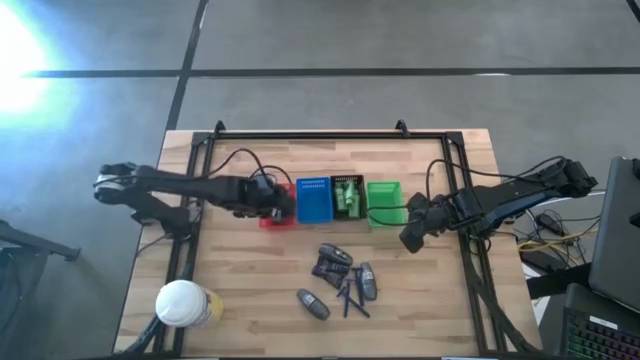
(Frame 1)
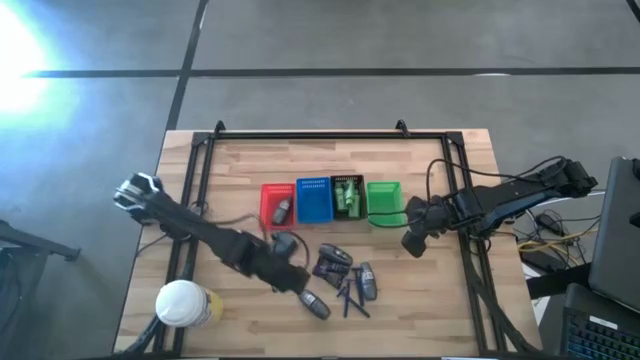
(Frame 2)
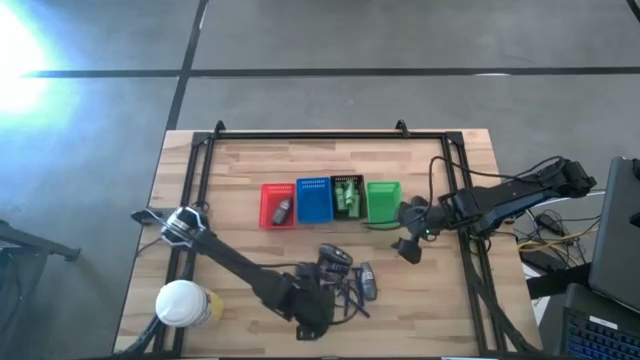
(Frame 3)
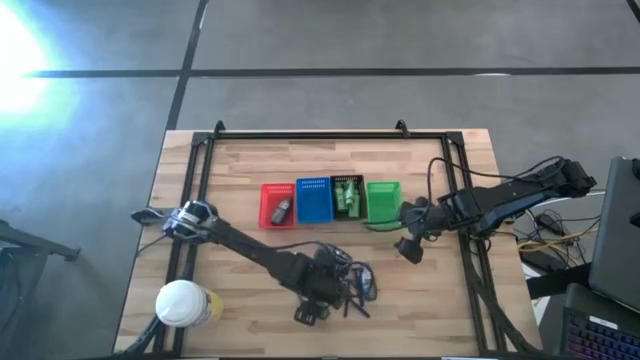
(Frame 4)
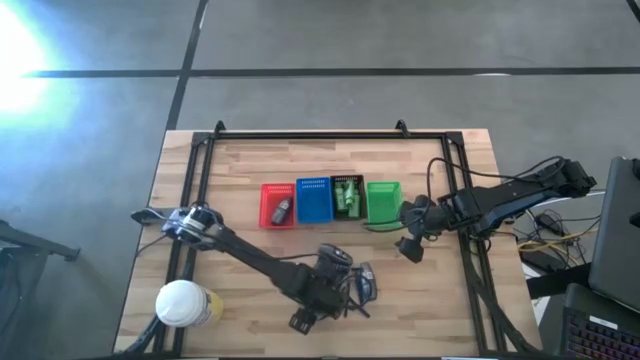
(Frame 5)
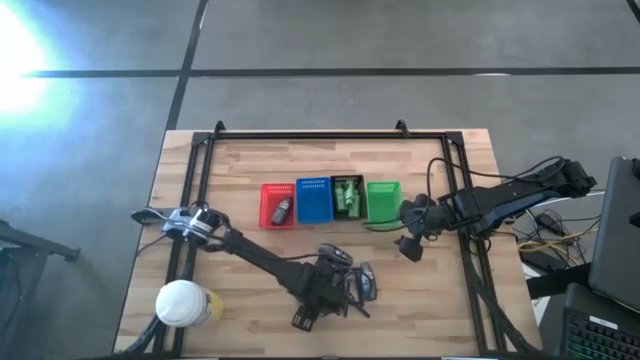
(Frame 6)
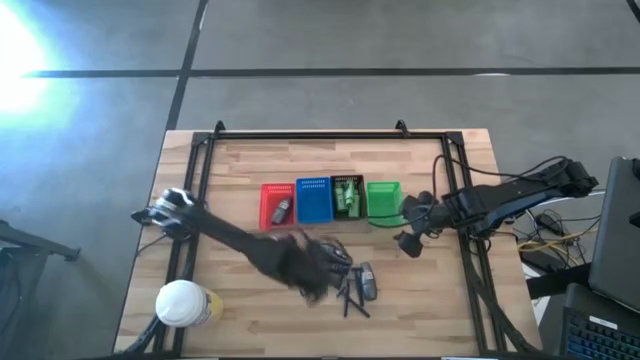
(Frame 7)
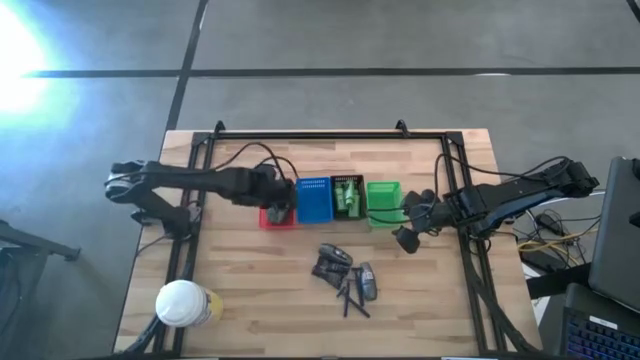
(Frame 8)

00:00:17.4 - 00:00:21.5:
Task: Pick & Place Travel size toiletries
Put the black deodorant into the red basket

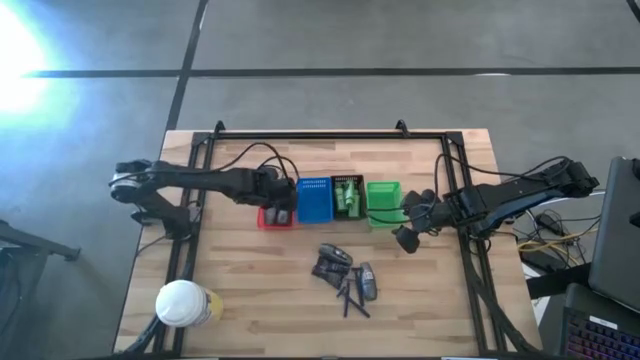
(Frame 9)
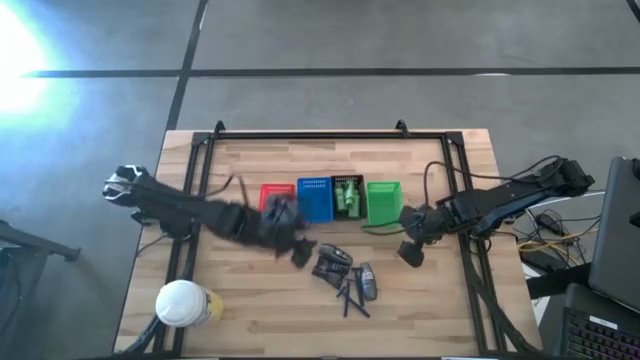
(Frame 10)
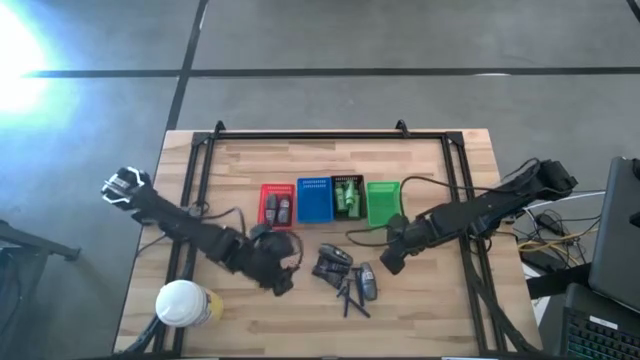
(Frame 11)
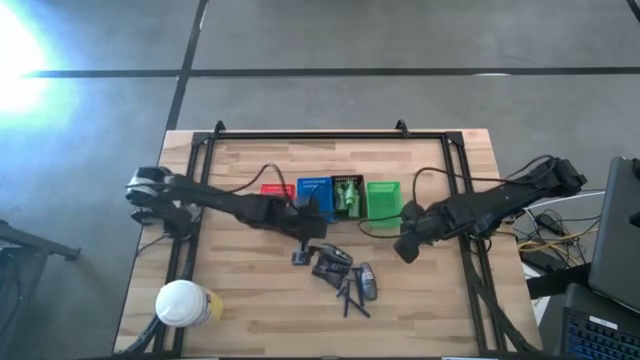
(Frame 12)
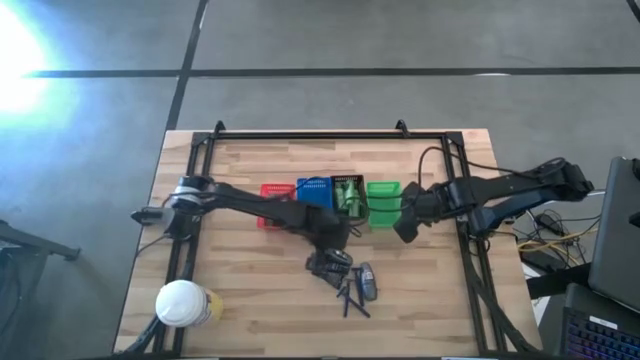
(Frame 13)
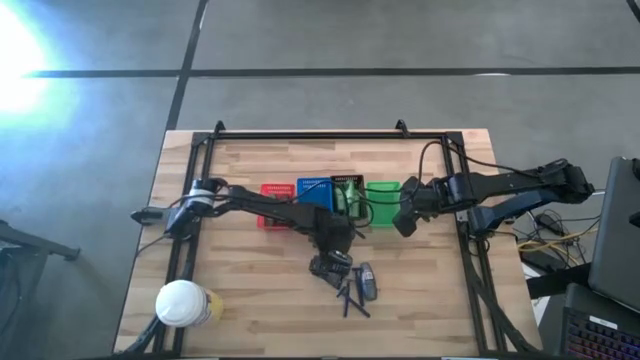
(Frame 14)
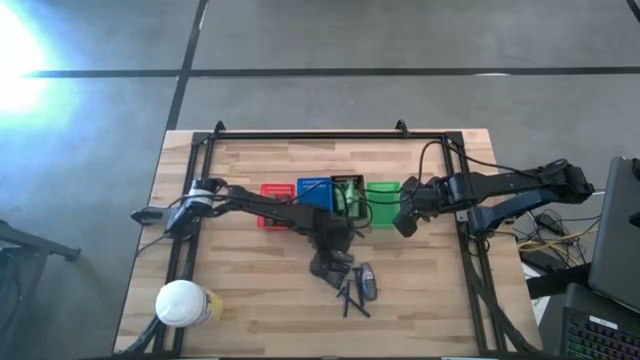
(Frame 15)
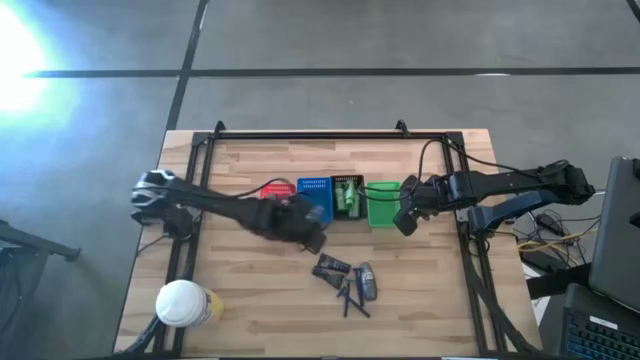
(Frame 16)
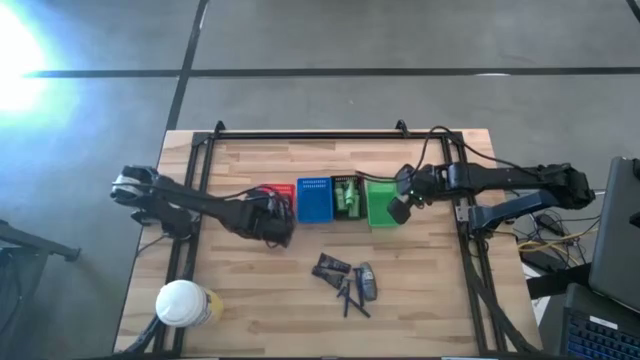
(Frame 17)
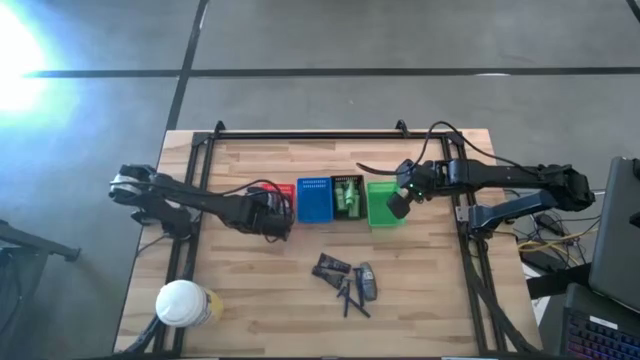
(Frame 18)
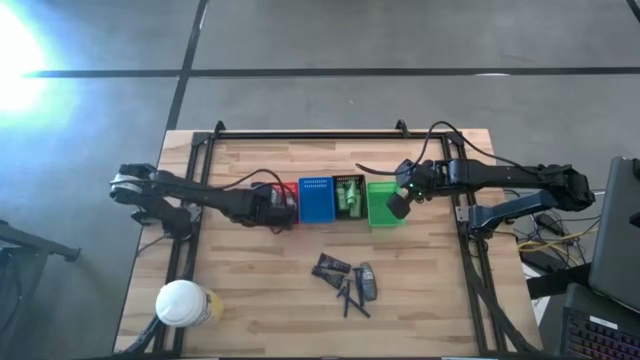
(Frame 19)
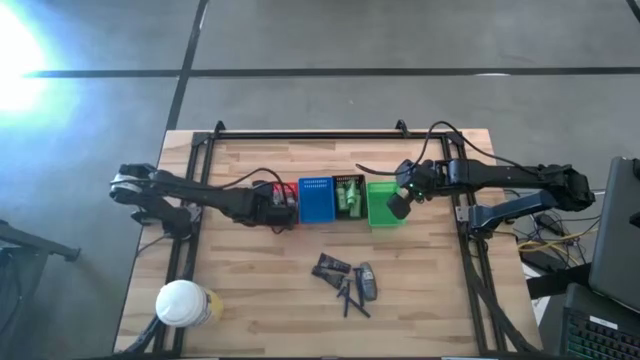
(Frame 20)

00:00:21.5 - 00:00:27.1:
Put the black deodorant into the red basket

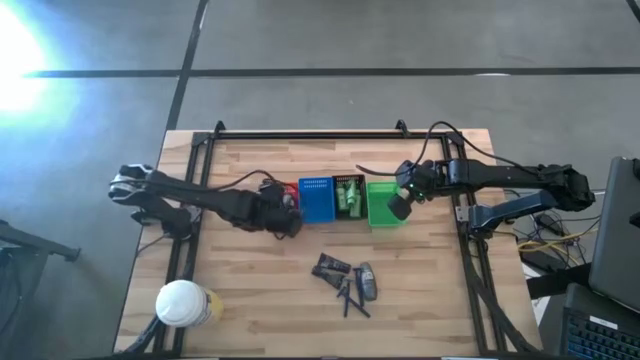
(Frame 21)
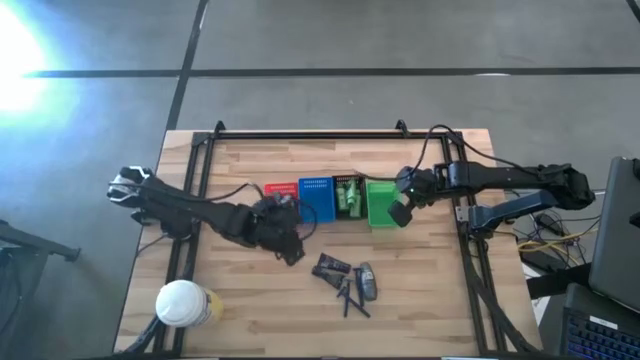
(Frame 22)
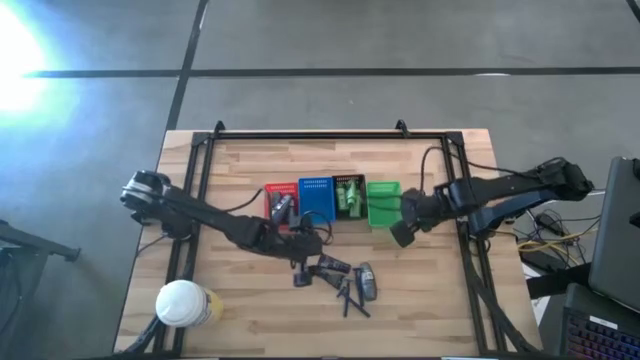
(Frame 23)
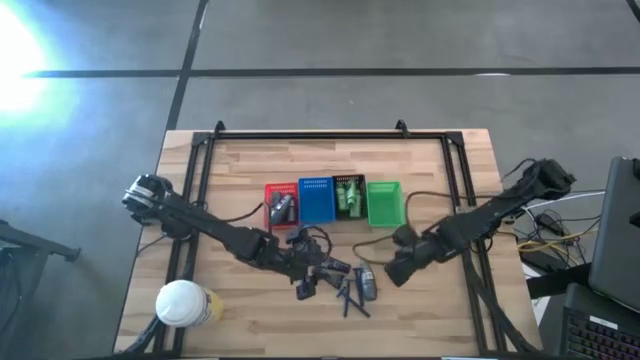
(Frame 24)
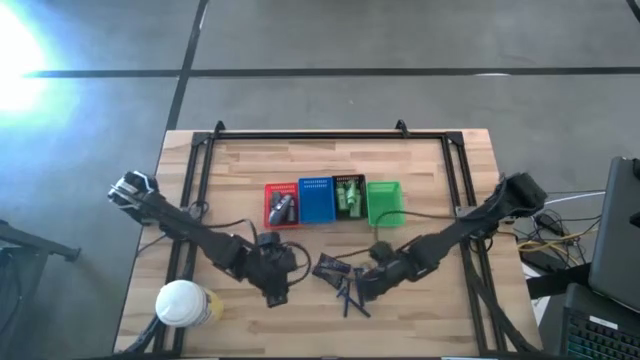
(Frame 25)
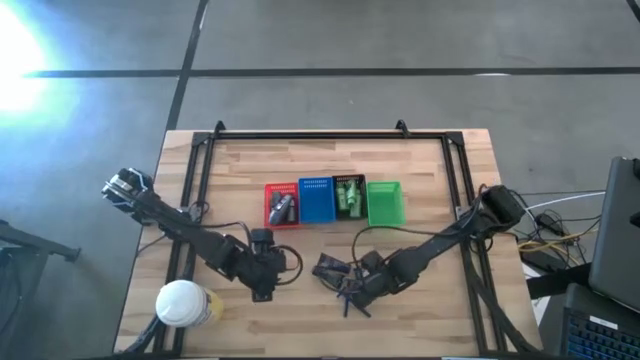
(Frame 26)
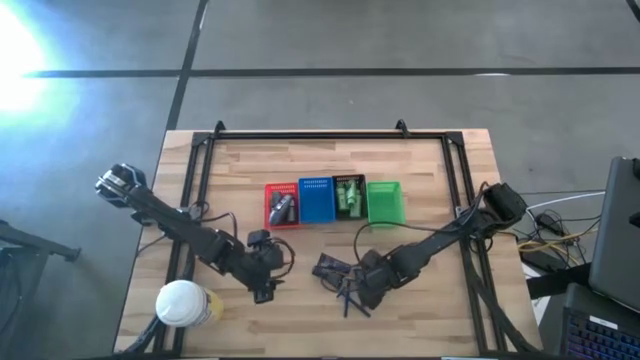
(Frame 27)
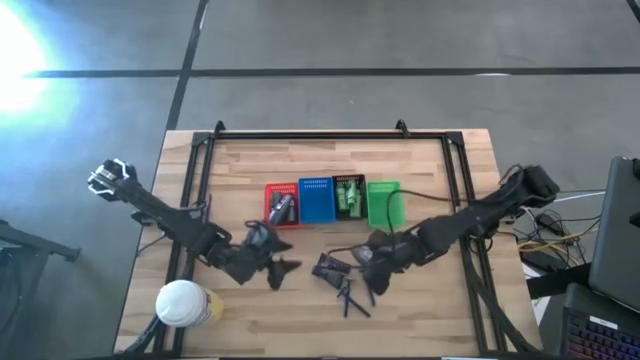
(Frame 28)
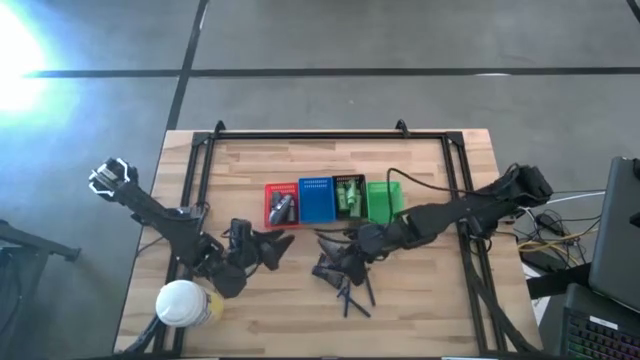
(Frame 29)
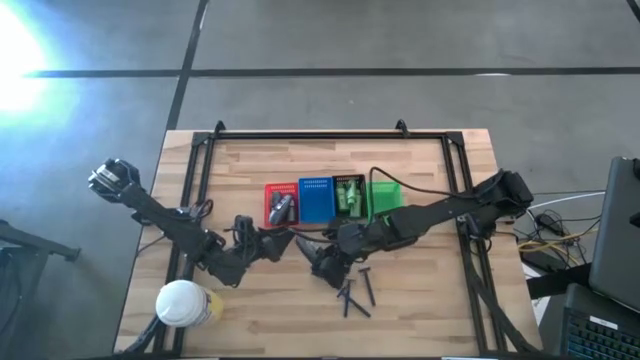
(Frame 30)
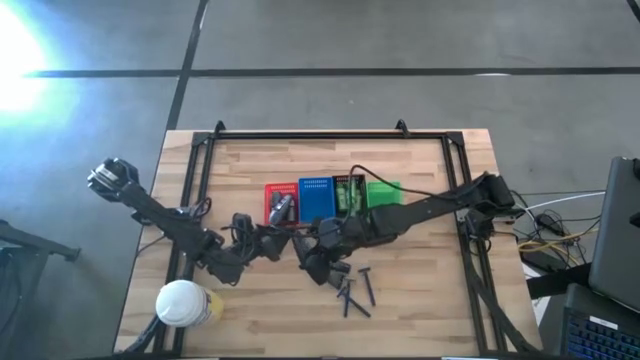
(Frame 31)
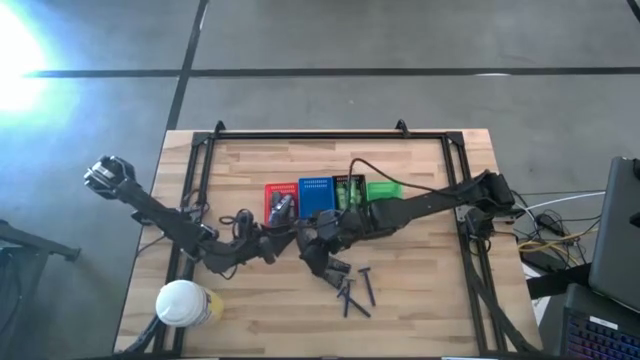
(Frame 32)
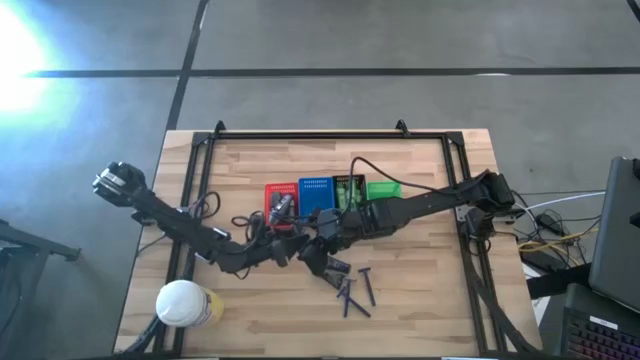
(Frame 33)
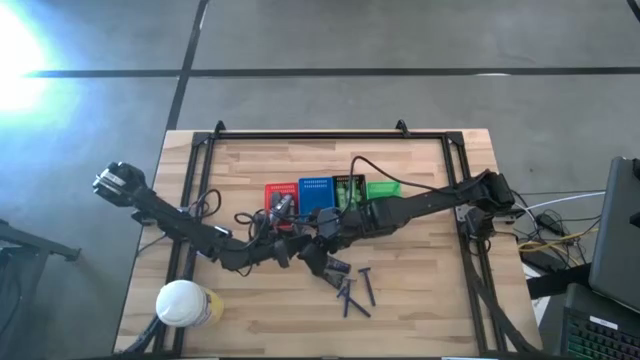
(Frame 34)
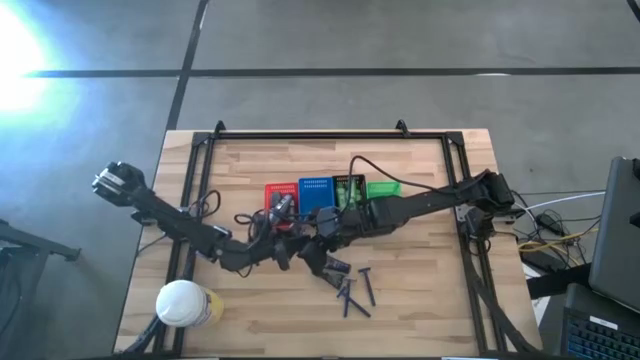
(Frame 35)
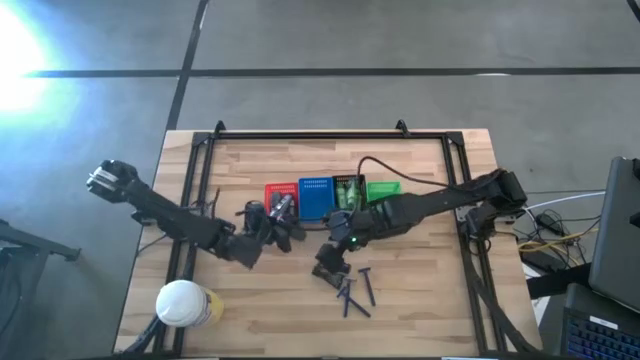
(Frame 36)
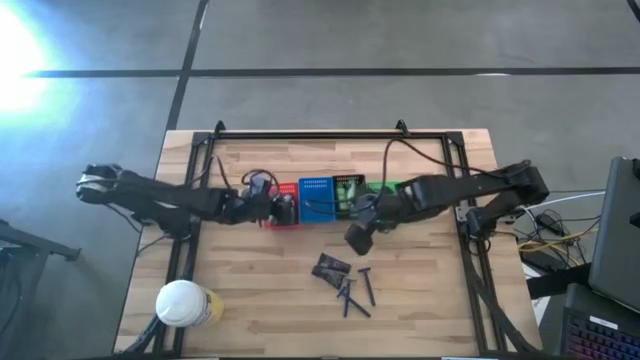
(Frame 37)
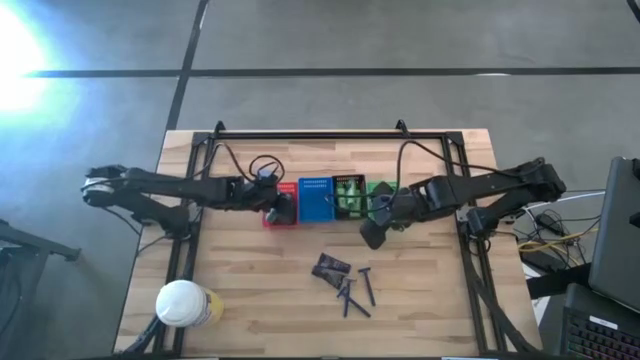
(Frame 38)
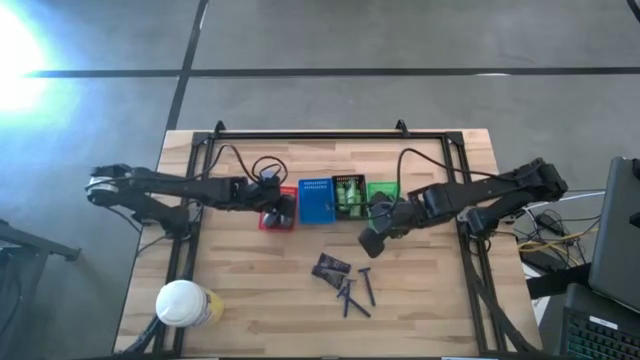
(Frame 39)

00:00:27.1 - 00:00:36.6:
Put the black deodorant into the red basket

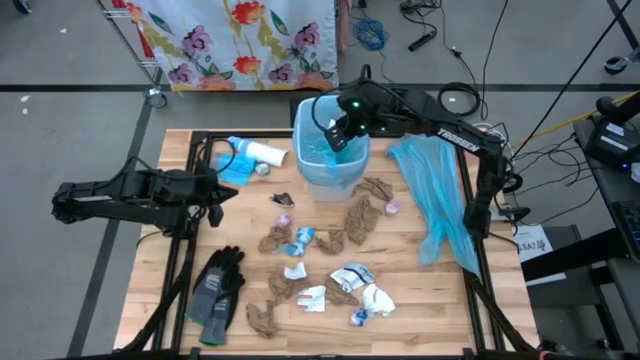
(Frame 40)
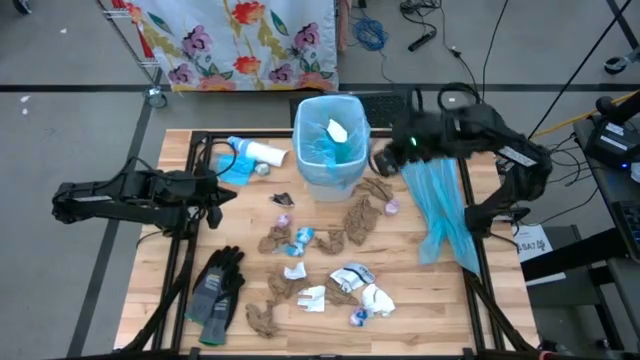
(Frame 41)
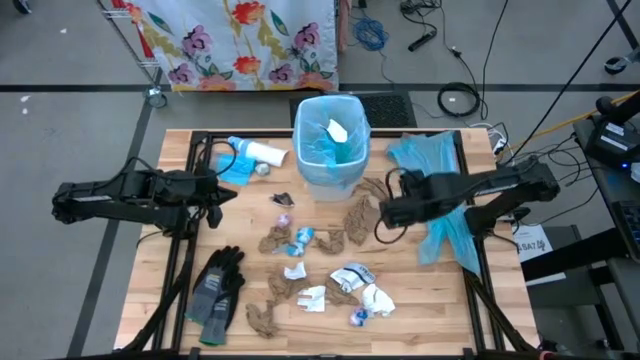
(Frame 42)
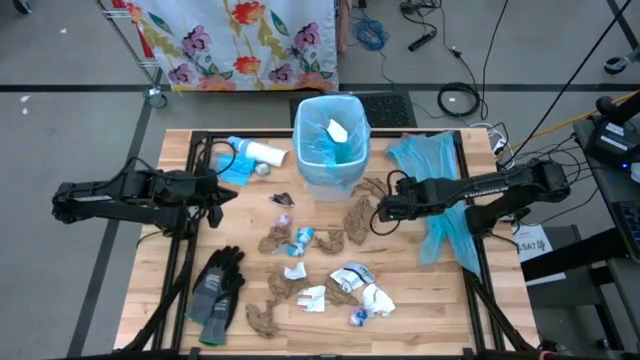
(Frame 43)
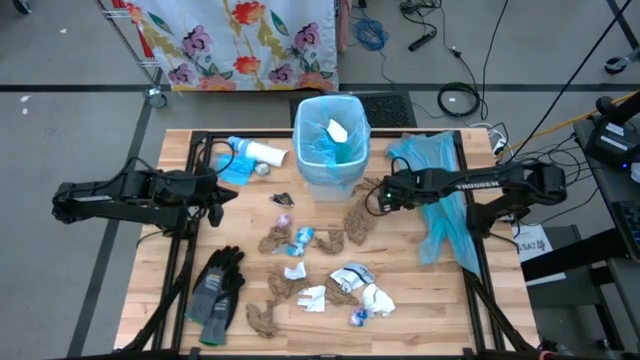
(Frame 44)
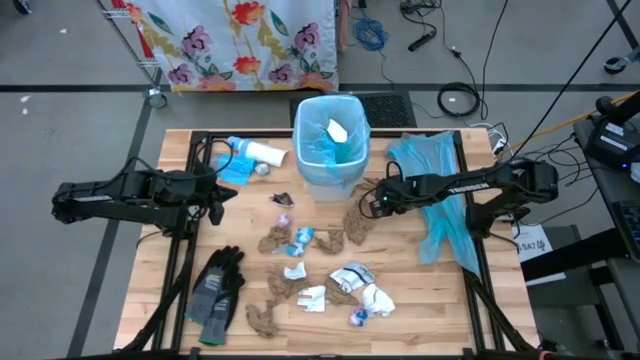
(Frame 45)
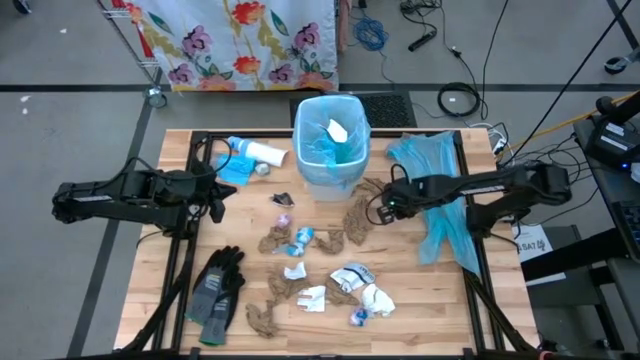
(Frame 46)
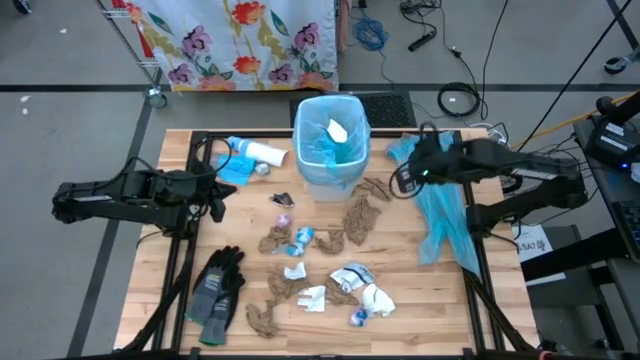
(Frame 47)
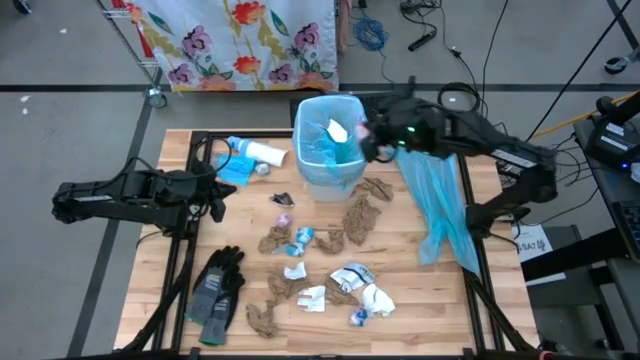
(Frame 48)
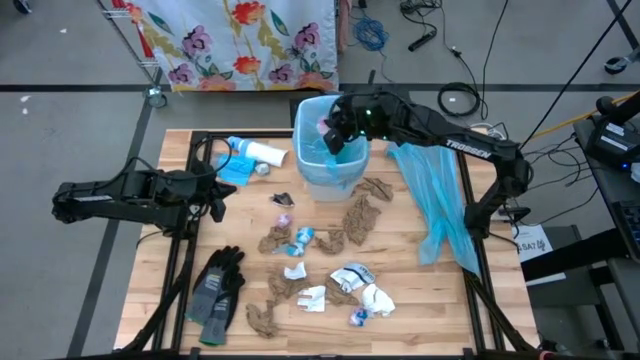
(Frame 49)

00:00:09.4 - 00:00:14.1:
Task: place trash/remove bag and relplace
Put the pink trashbag into the trash bin
